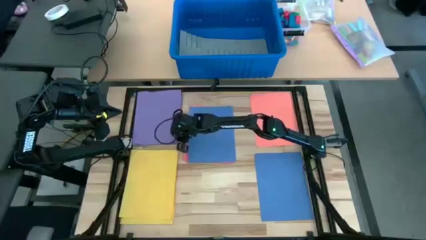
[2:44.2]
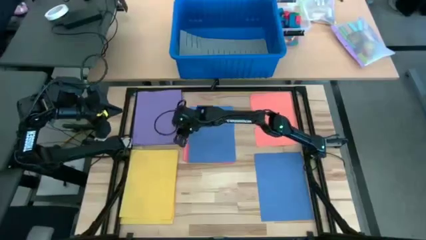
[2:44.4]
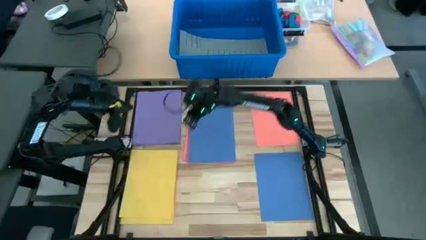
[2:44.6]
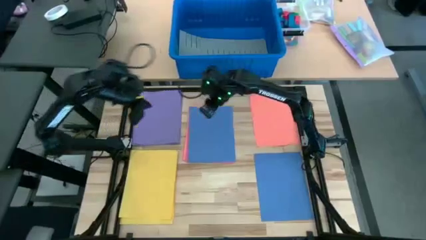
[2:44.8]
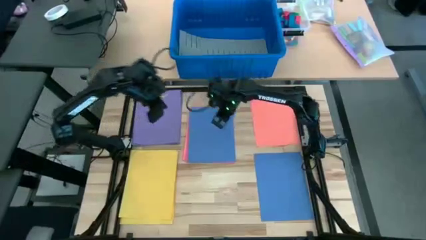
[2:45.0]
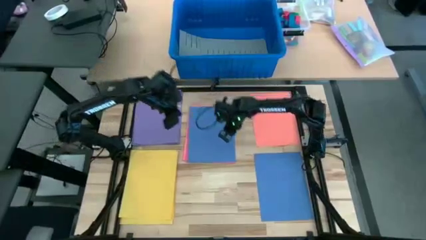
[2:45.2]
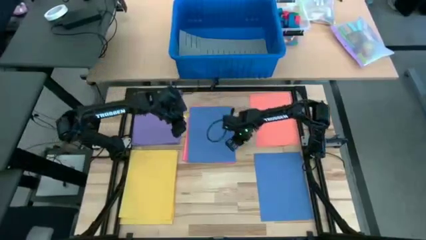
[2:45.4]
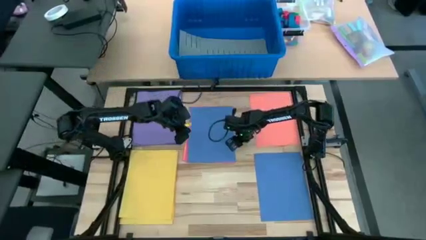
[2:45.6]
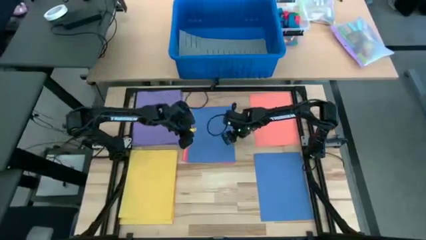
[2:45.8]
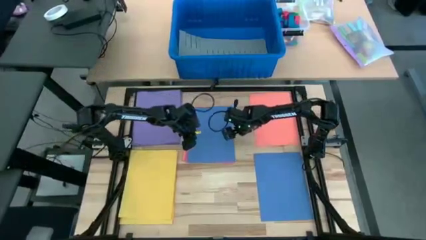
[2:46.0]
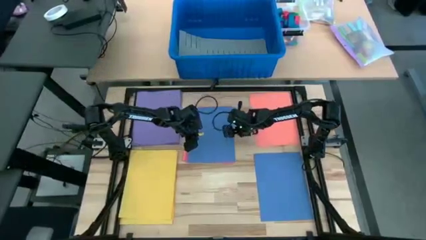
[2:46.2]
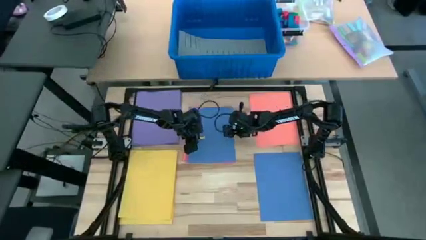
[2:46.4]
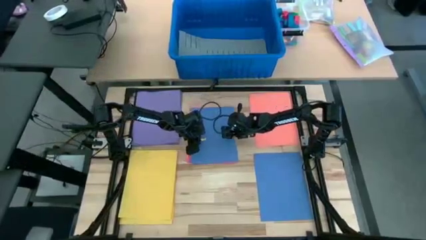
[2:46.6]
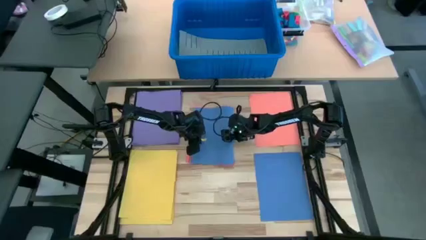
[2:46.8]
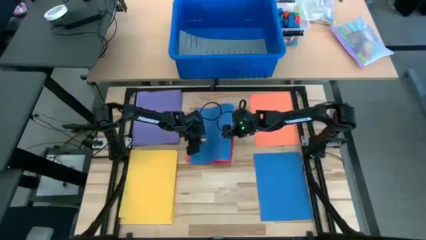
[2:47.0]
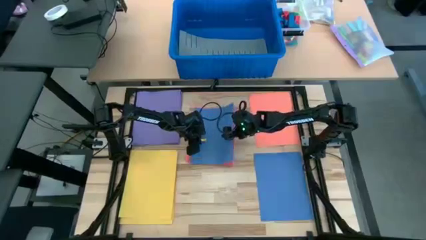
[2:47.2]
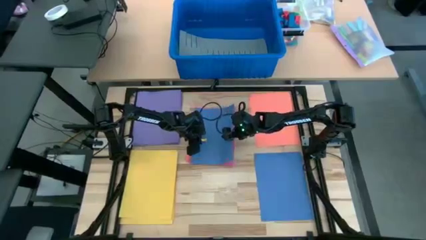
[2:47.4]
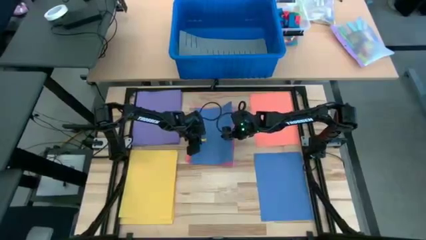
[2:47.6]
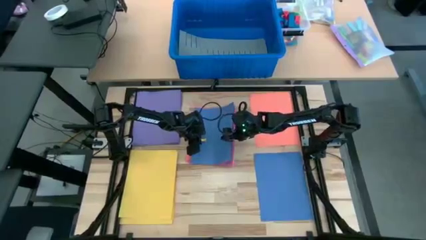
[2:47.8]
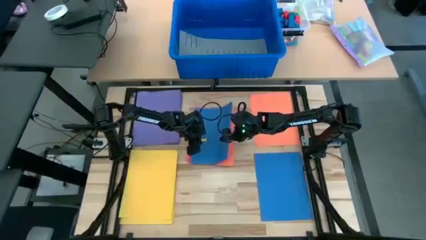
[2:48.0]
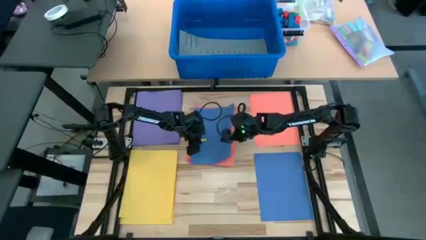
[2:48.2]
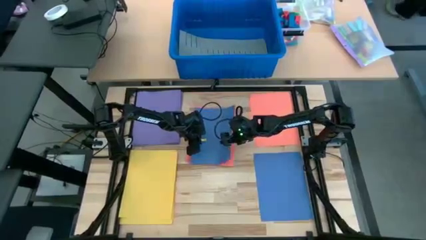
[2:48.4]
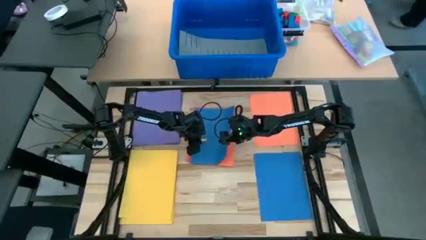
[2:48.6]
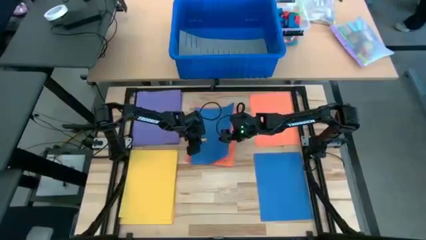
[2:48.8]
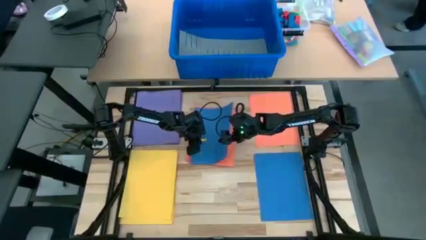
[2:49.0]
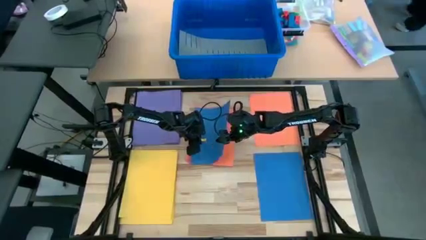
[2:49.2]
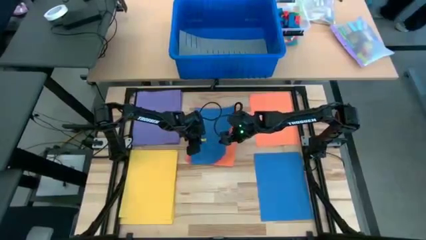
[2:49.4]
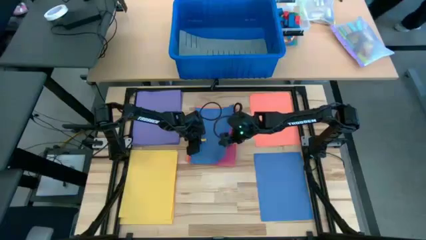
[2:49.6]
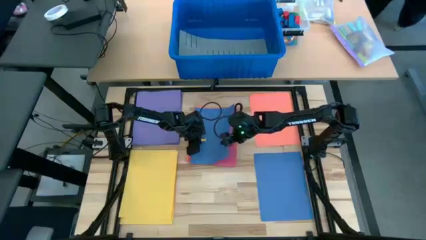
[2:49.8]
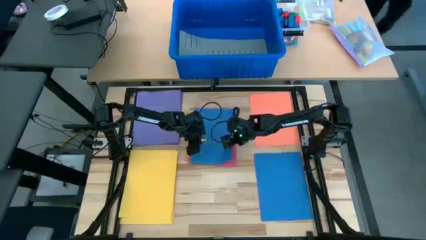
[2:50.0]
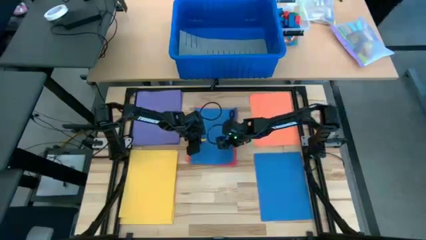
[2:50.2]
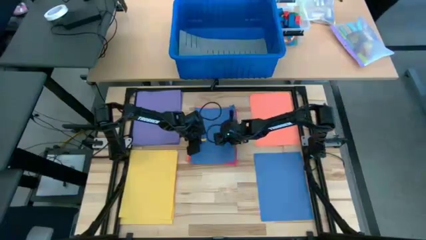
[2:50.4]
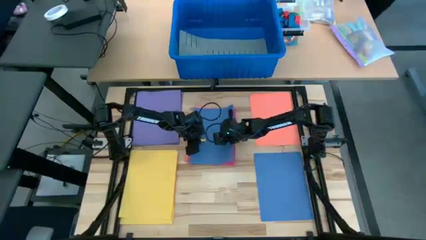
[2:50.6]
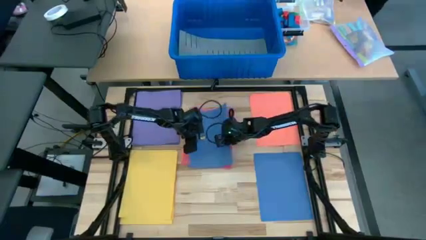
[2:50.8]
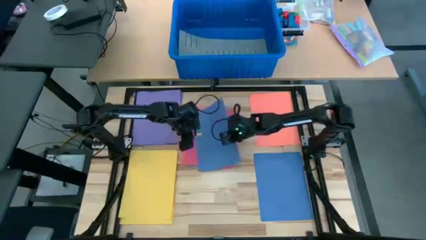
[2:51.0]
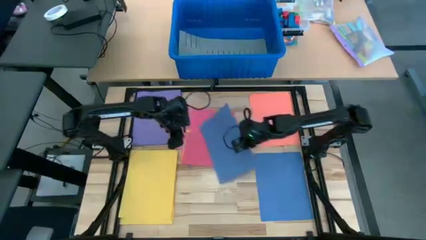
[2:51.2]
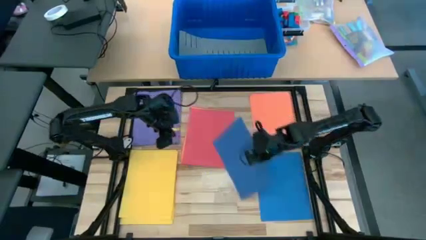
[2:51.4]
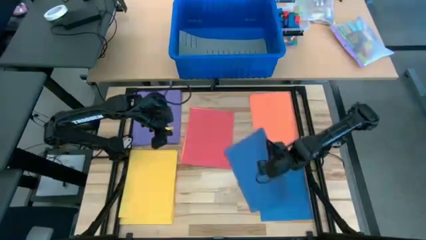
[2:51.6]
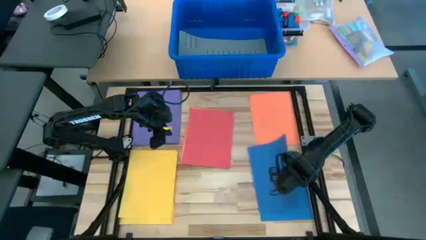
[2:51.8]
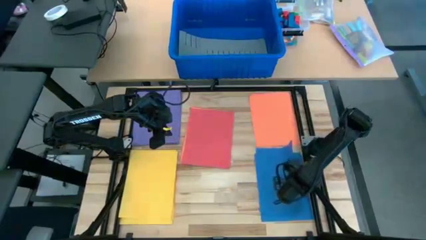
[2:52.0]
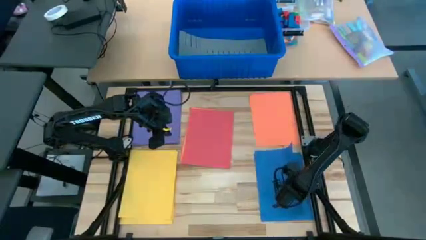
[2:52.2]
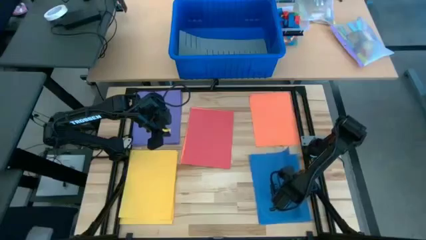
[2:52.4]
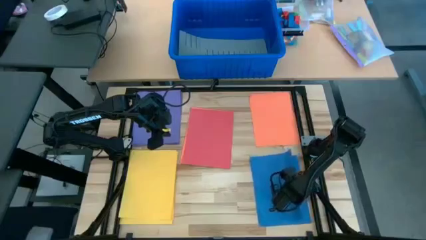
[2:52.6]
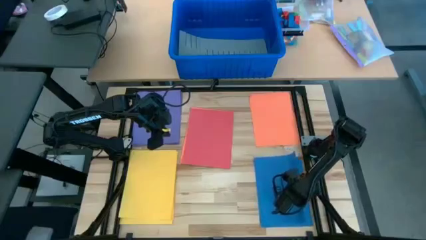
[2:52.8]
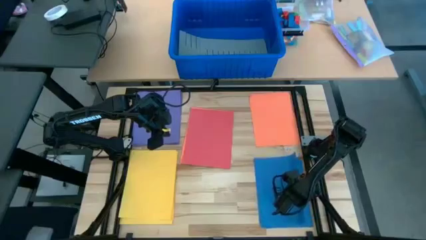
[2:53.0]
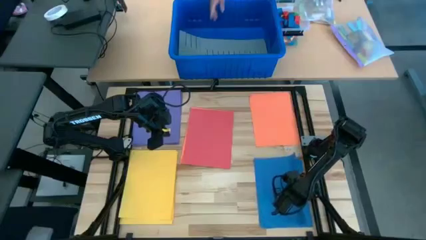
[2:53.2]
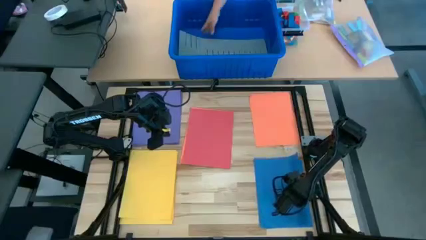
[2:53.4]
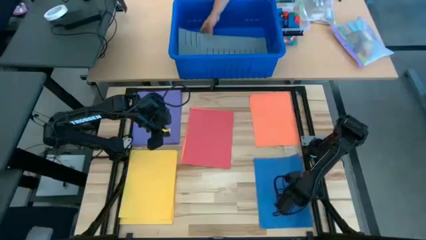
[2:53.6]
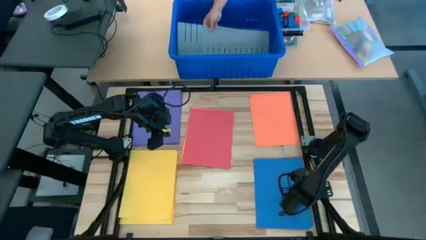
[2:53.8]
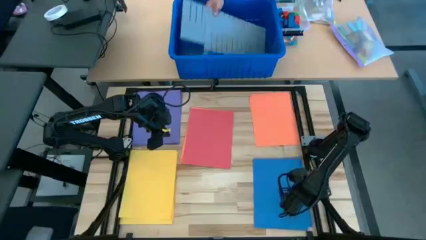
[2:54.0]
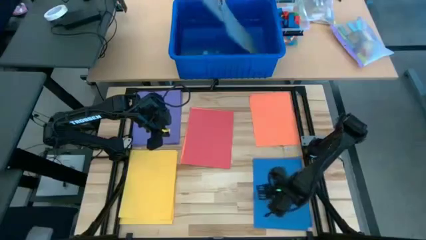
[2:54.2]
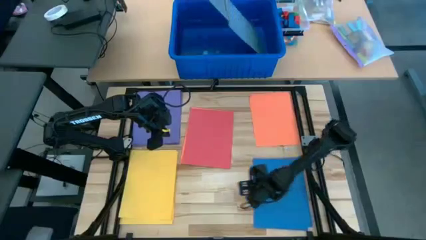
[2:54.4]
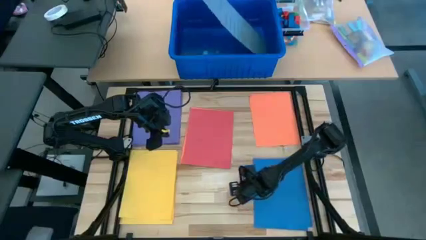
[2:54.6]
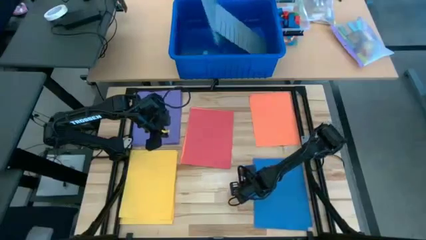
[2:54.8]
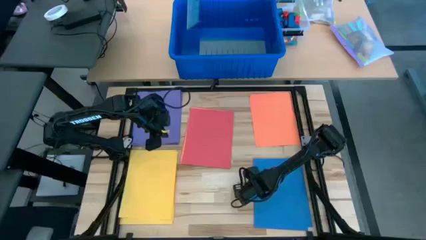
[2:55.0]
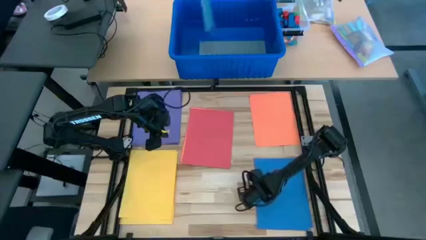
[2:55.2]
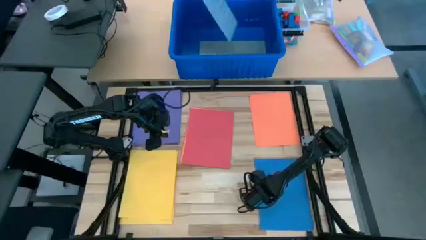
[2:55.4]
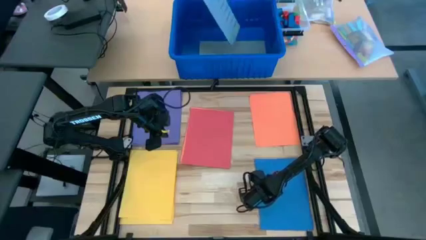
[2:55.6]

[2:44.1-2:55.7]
Task: Organize paper
Stack the blue colored paper on top of the other blue colored paper

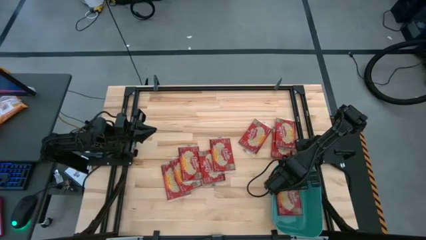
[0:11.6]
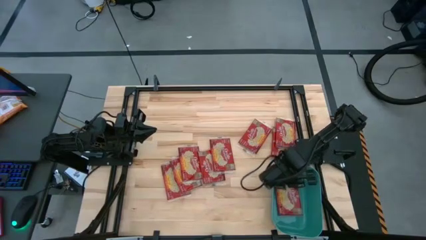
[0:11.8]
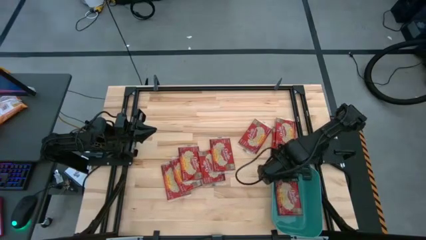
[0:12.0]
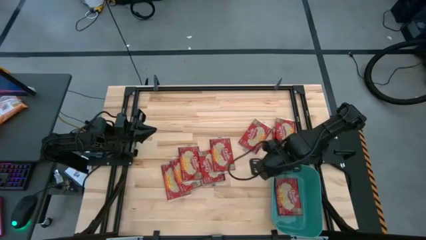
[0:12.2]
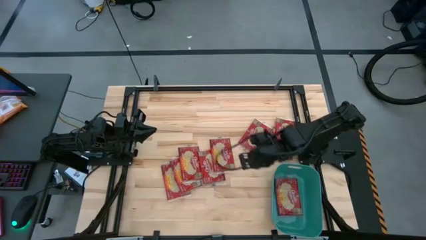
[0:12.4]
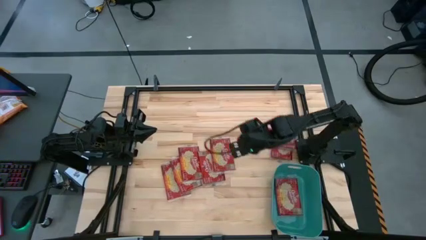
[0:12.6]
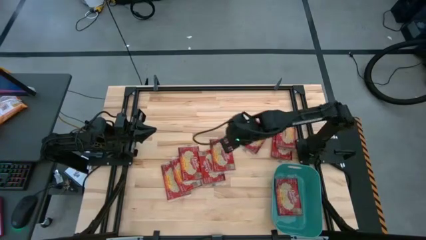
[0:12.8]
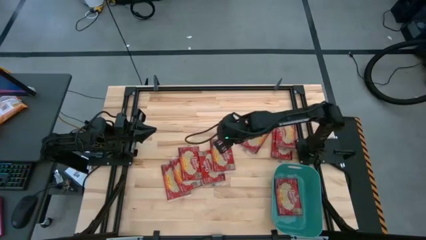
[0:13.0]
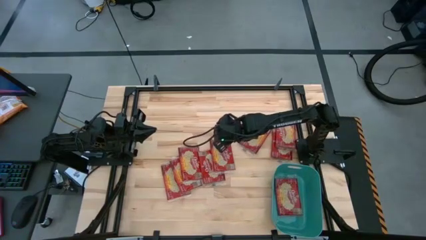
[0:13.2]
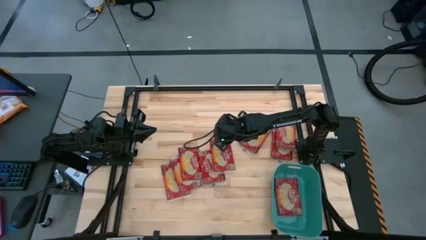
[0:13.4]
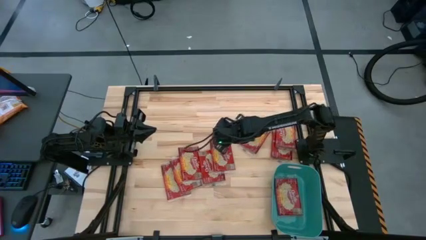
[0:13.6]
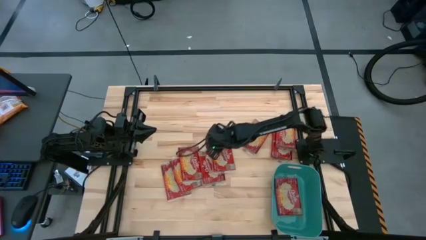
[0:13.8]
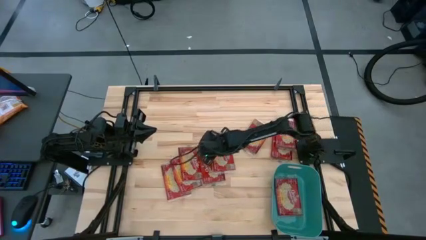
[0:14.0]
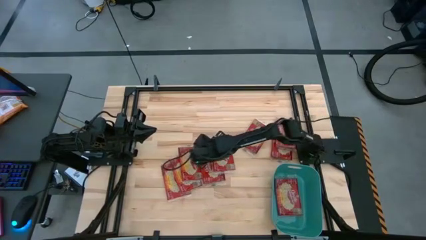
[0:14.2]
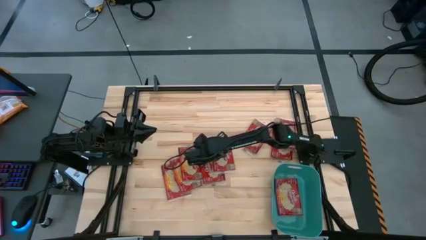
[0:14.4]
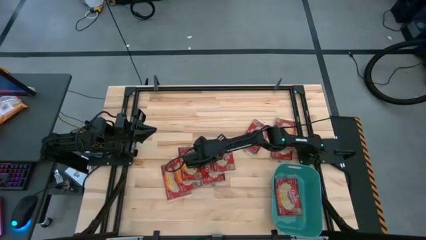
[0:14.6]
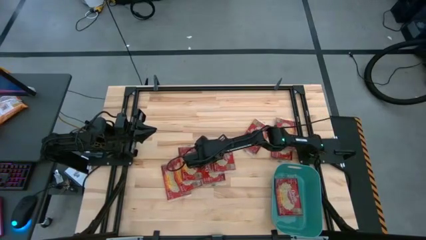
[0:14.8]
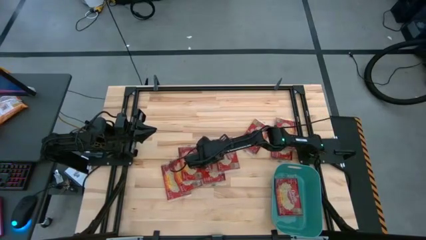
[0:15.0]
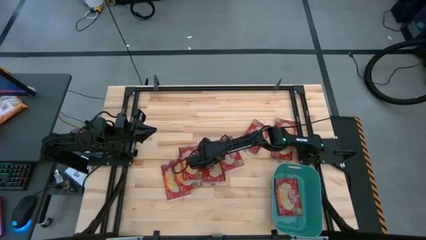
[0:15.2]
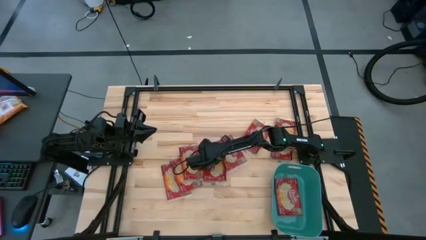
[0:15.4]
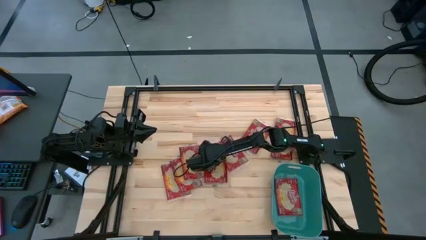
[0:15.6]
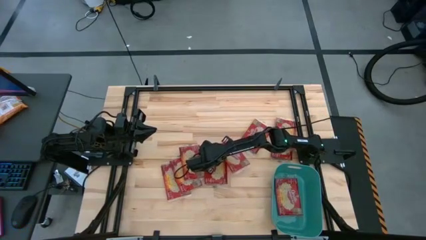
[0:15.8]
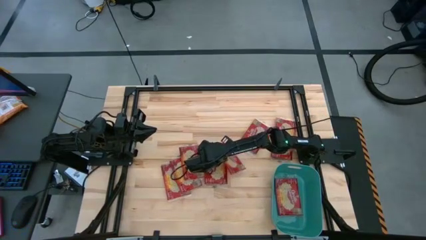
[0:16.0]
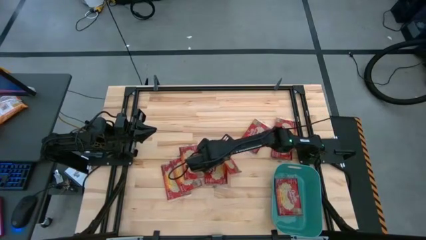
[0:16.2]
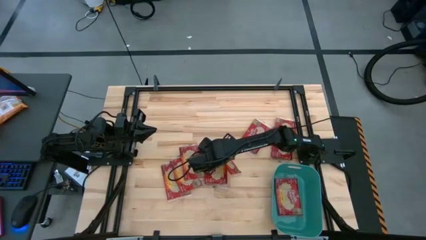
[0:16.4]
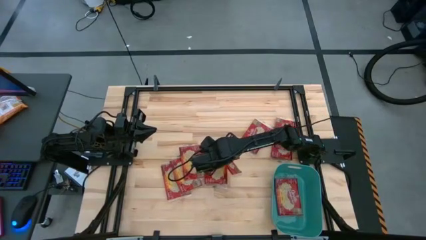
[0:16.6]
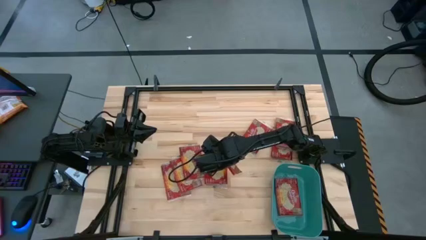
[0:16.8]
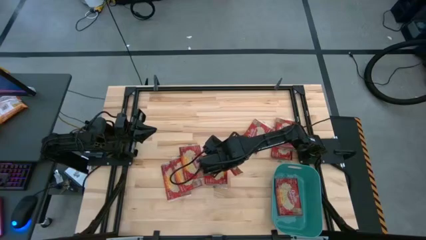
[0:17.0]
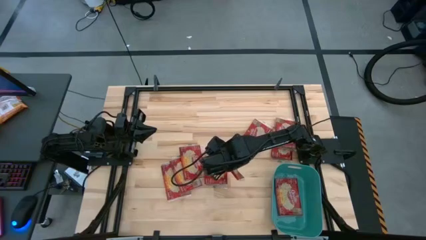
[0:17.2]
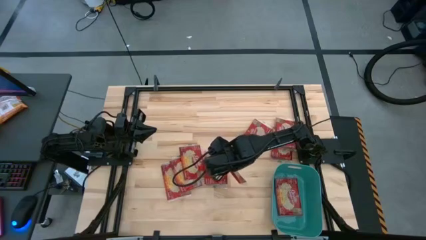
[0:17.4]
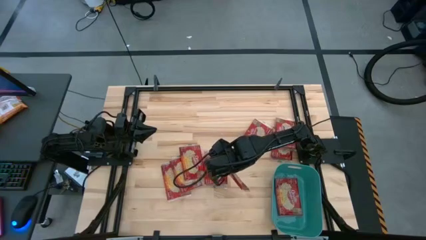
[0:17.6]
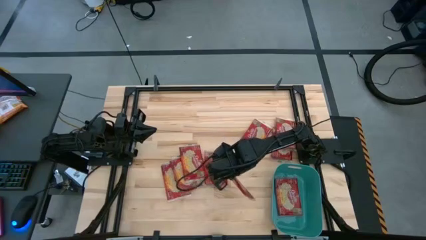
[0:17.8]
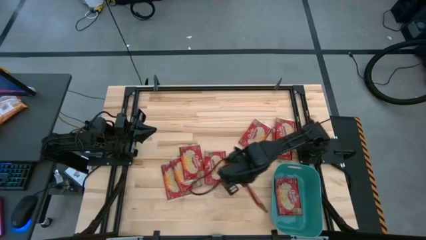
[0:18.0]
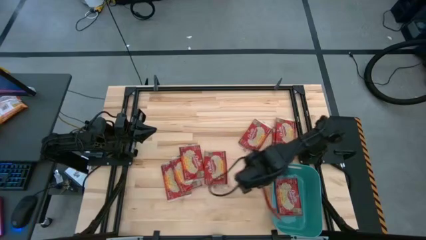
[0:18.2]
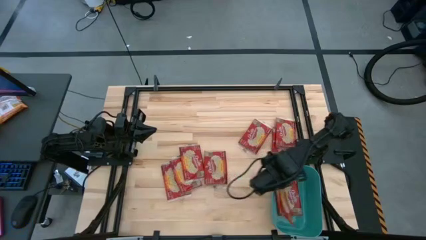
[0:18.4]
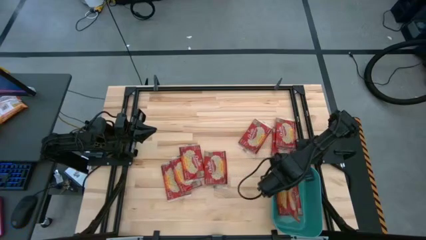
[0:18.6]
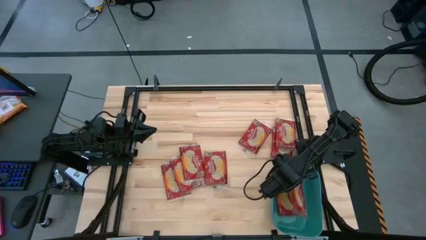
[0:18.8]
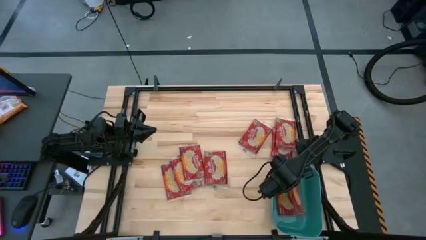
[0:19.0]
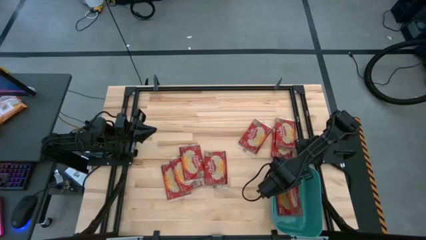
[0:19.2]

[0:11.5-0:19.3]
Task: Sort popcorn bags into baskets
Put the red popcorn into the green bin
